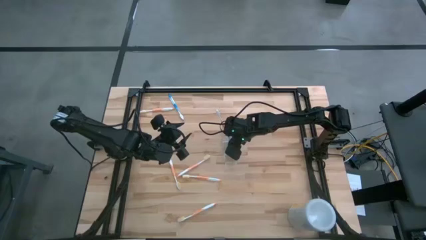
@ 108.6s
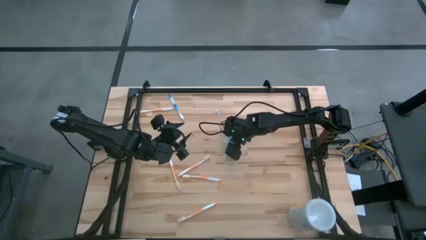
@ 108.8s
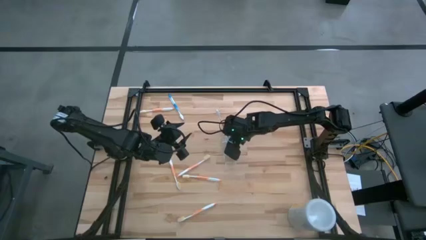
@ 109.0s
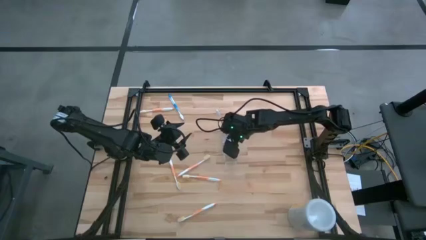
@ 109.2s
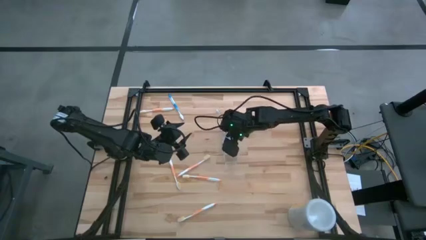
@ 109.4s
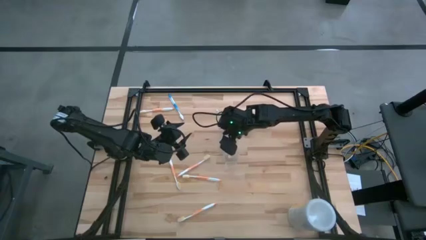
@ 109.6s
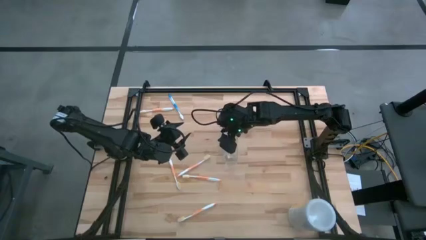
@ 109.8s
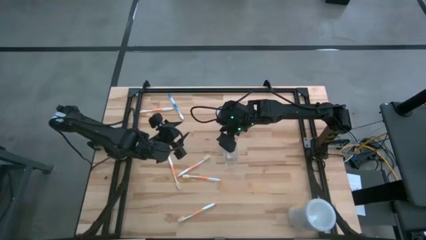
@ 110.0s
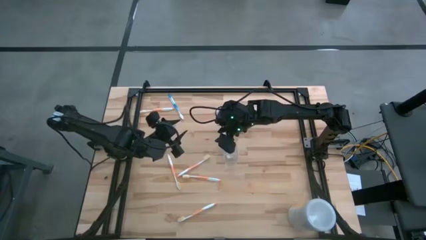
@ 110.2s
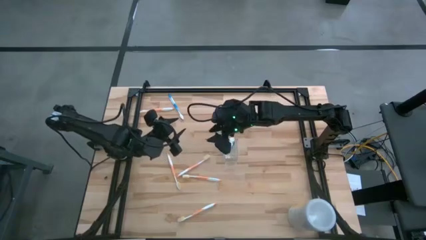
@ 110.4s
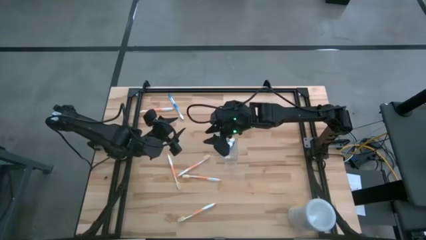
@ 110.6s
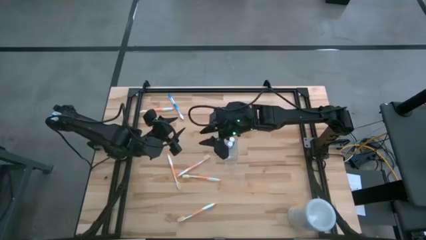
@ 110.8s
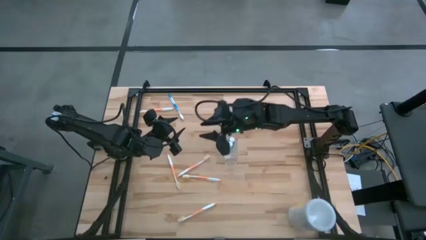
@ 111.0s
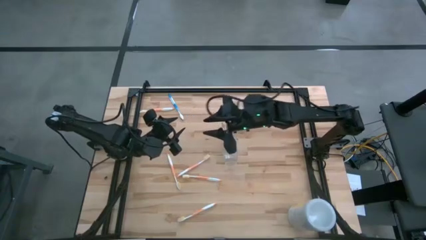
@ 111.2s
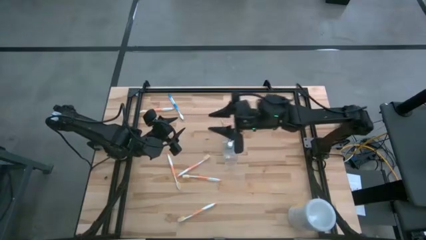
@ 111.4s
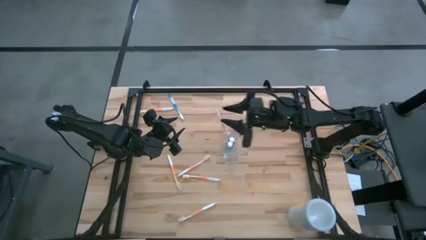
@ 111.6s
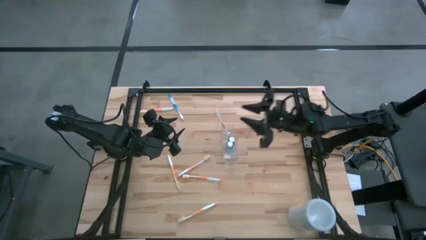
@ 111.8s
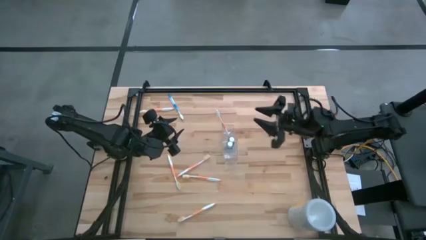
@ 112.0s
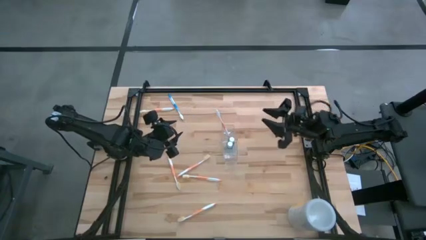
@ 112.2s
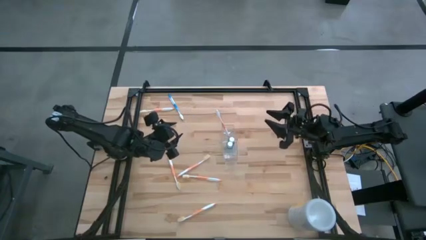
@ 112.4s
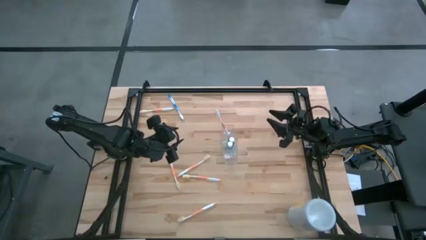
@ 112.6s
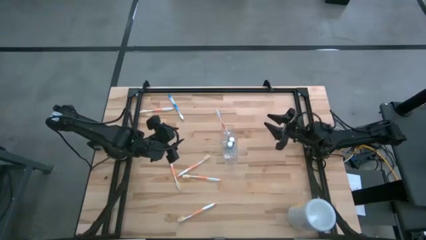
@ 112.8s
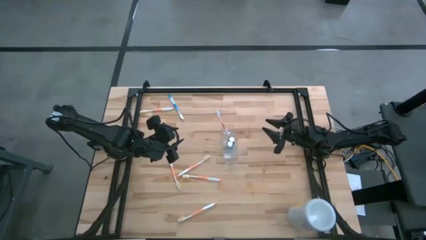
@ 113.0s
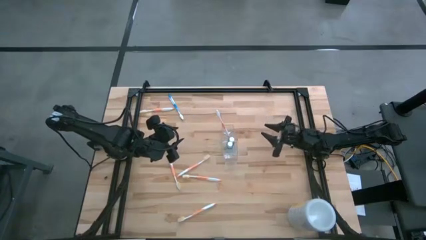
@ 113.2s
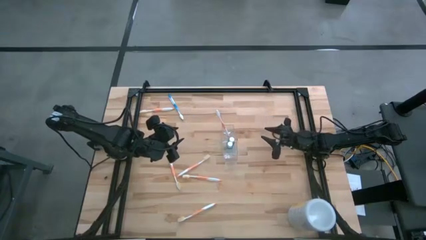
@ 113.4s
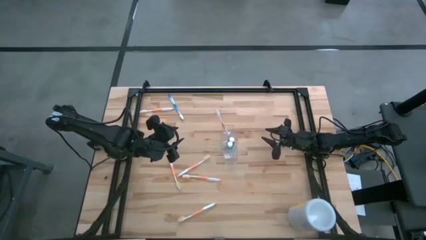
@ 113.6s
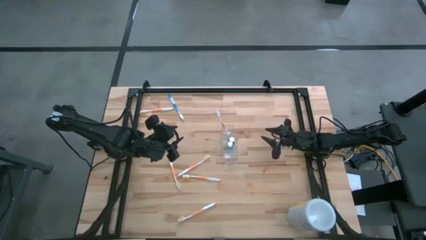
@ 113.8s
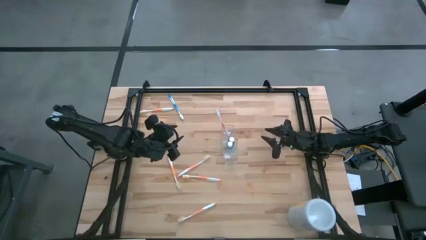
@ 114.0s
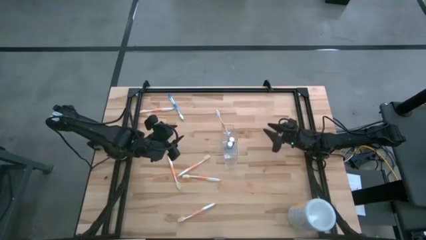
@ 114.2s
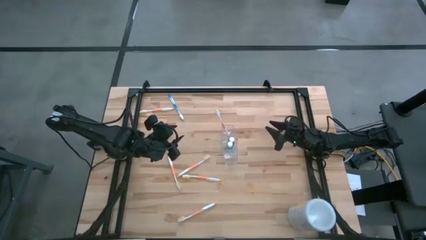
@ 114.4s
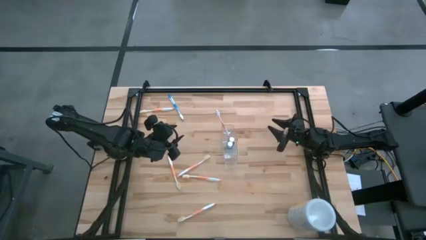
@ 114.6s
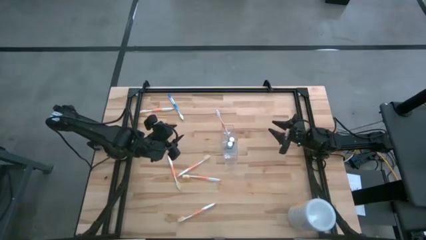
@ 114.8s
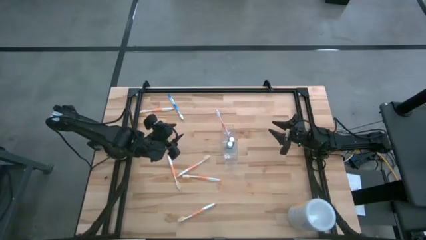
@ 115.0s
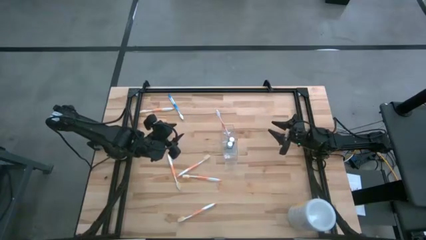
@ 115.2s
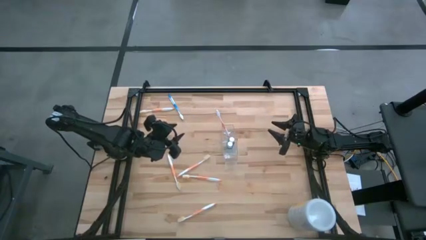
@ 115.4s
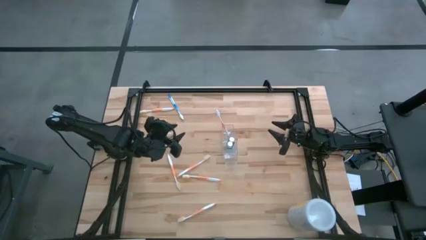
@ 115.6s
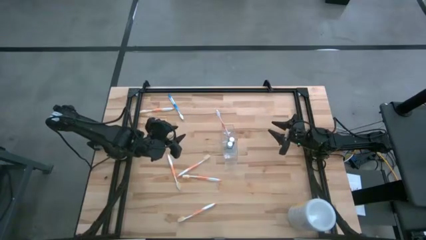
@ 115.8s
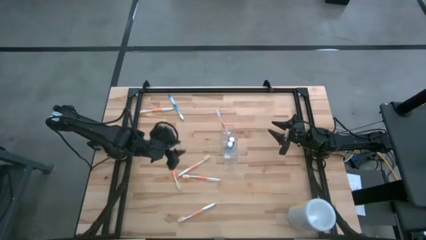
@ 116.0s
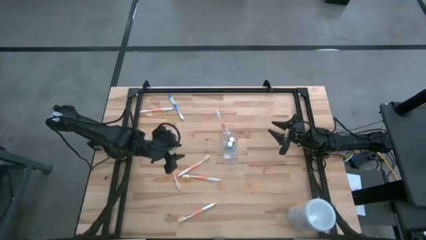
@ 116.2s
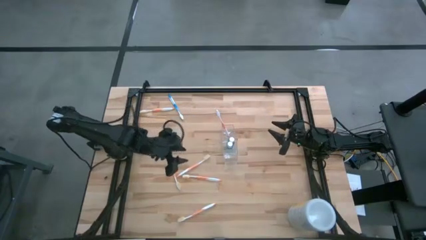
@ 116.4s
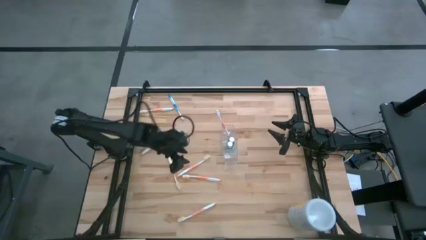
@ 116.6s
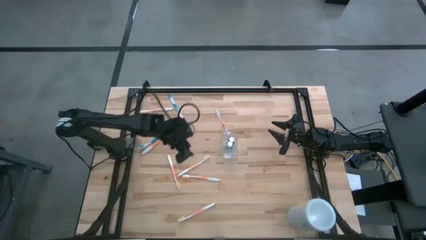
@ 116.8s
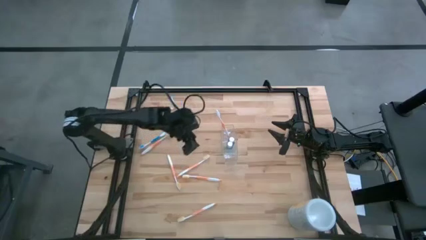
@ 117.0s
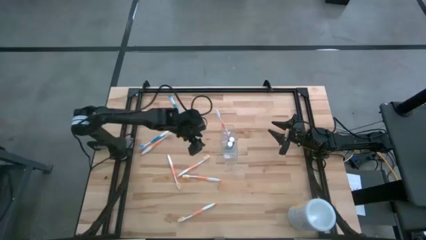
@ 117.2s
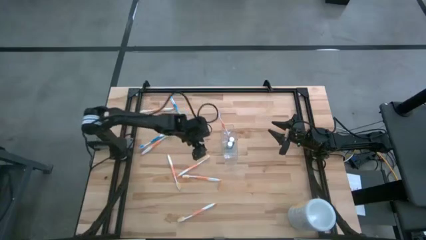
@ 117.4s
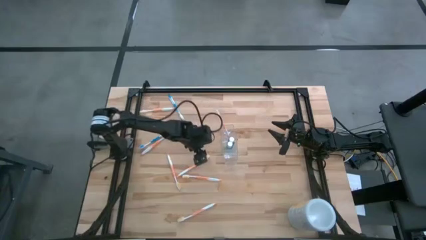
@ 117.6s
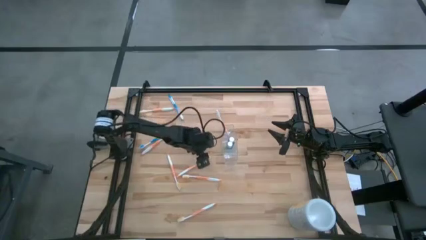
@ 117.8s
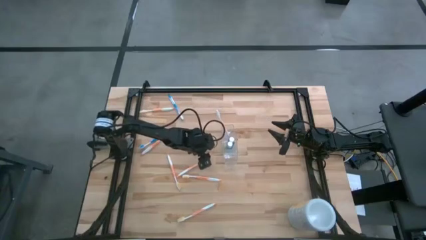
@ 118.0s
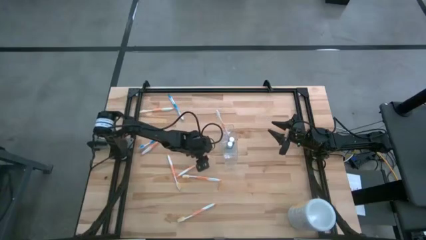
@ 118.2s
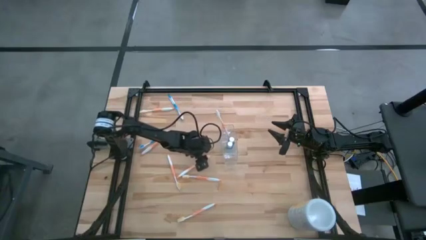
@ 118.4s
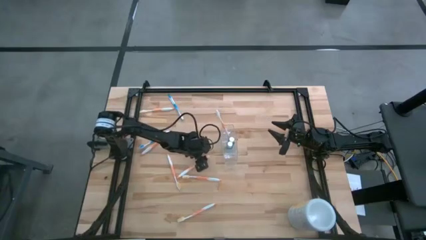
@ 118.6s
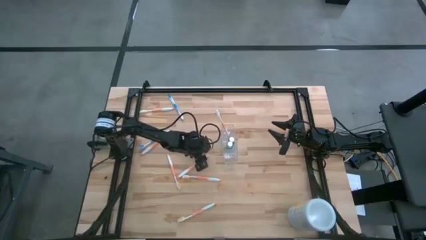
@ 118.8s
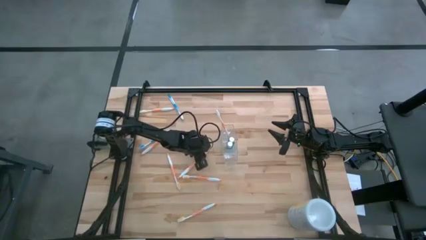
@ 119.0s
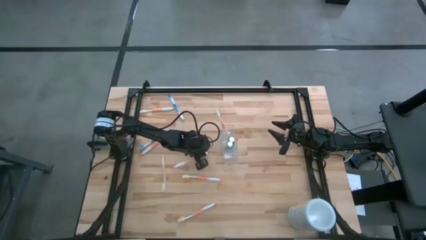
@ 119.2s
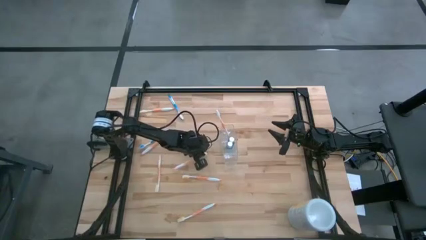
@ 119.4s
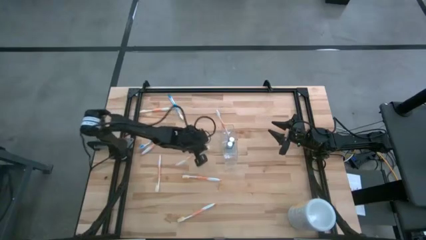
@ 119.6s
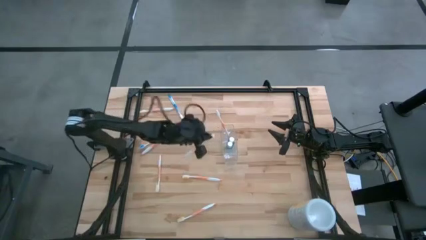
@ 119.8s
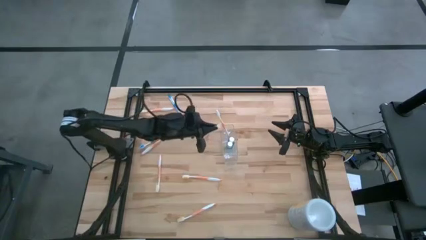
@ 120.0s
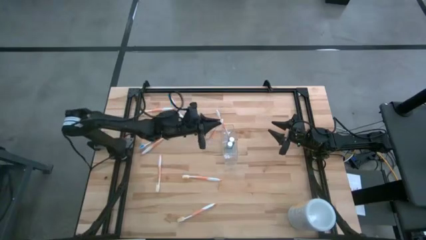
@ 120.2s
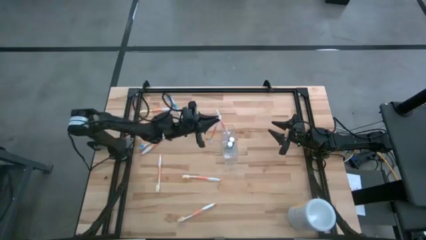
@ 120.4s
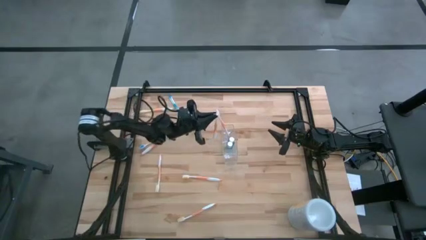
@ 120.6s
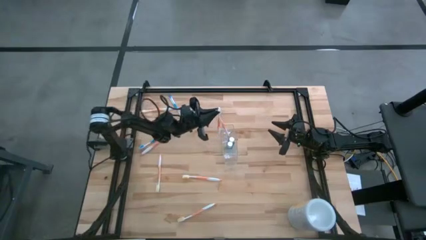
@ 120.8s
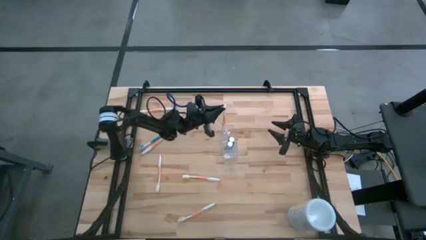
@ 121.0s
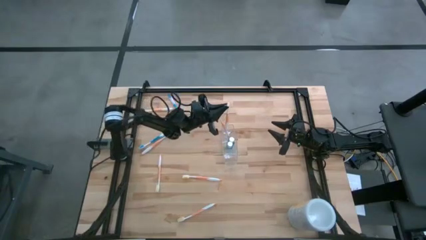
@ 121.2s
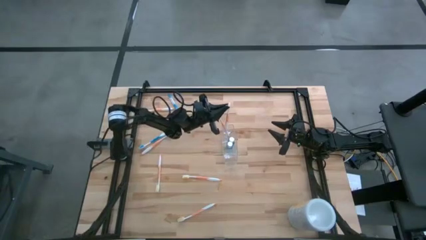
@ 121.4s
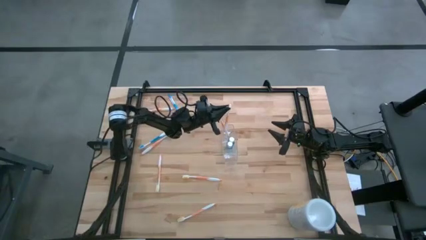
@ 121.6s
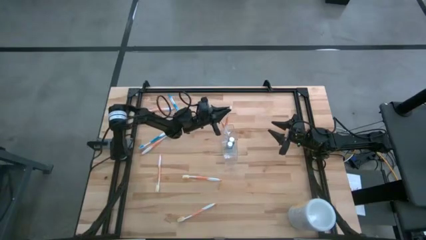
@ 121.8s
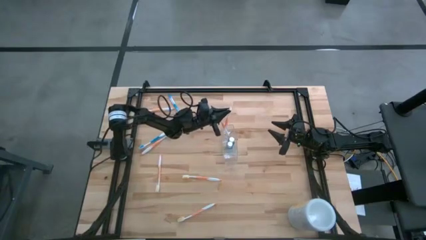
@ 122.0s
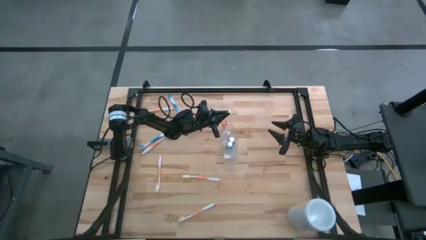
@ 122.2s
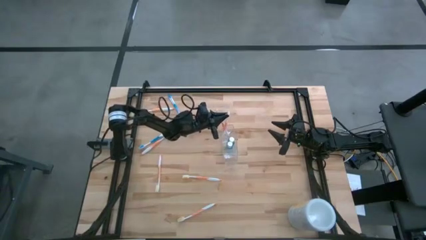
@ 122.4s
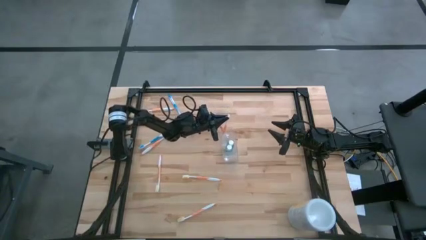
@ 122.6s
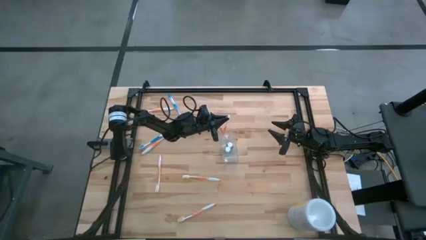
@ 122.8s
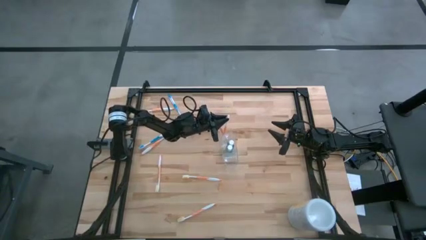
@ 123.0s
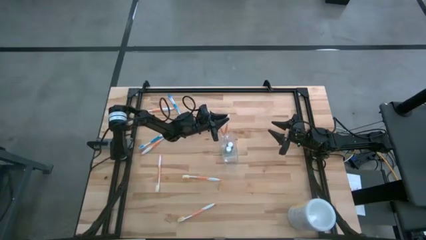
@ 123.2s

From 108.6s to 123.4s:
Task: Pick & Place toothbrushing station
Put the orange toothbrush into the transparent organizer

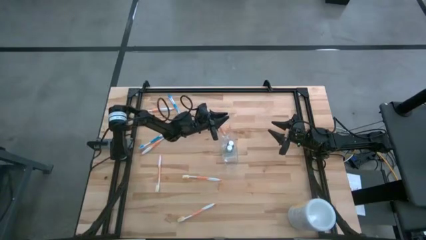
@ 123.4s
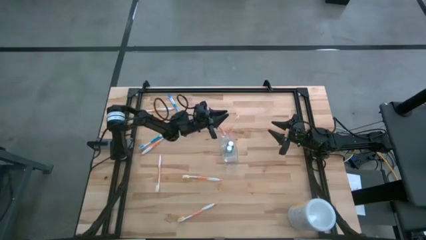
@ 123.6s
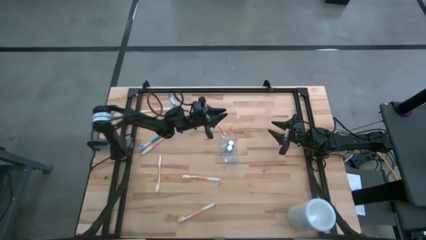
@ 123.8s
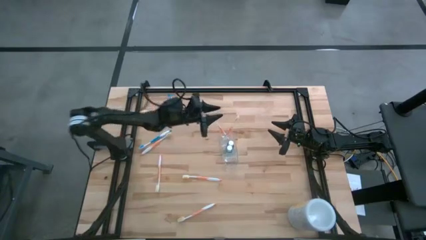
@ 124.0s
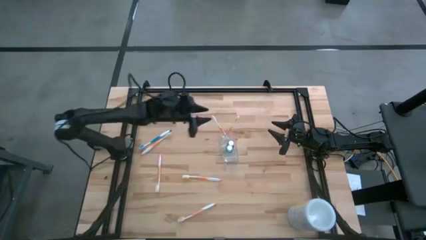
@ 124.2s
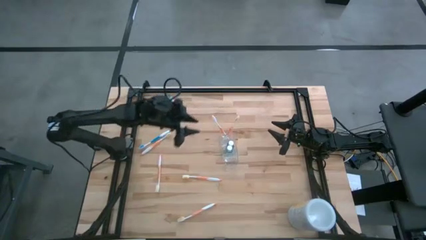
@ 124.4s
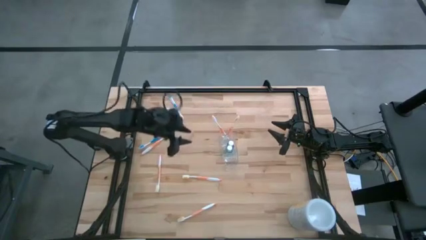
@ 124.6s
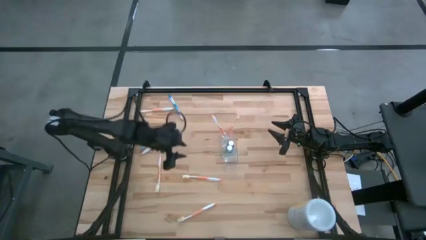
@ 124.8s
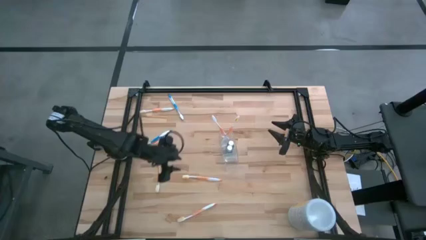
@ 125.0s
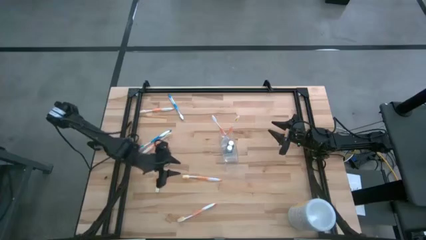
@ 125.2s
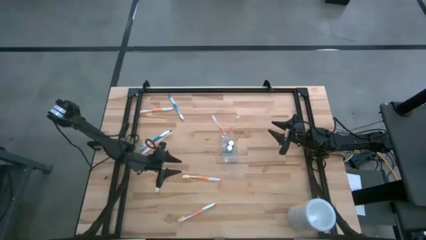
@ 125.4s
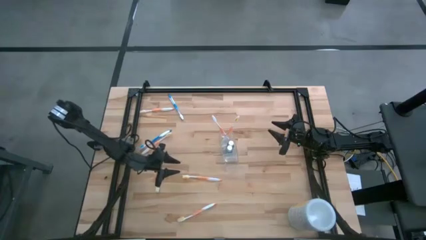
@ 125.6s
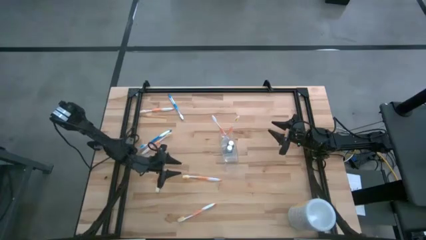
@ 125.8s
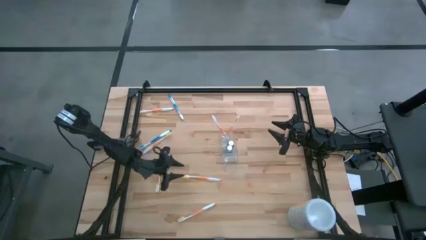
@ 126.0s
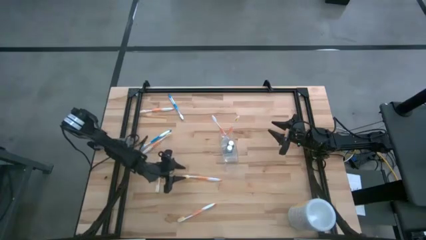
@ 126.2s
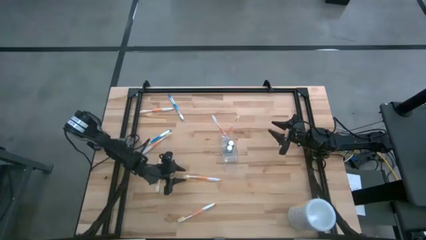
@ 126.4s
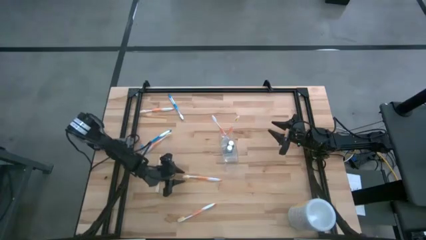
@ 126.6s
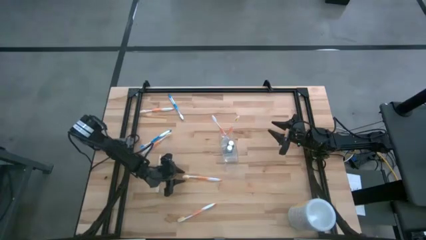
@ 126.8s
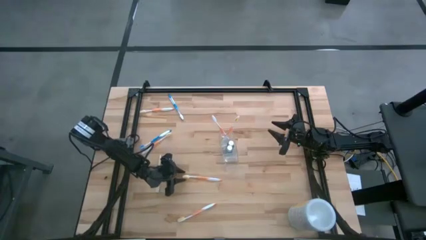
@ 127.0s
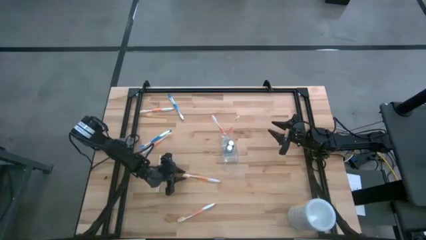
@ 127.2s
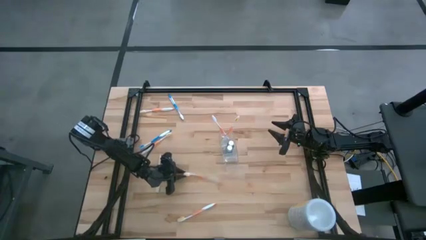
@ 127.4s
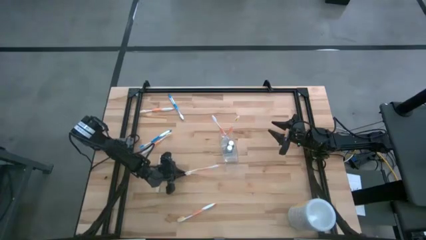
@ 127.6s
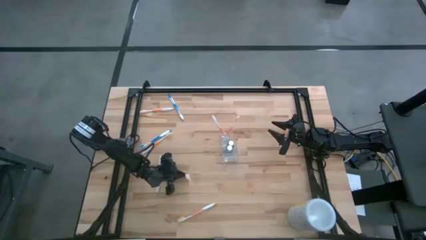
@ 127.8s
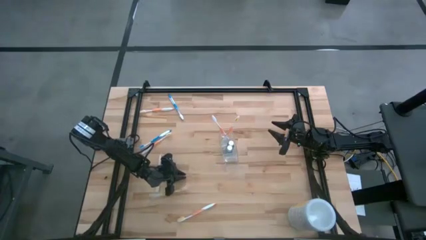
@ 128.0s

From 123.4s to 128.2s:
Put the orange toothbrush into the transparent organizer
